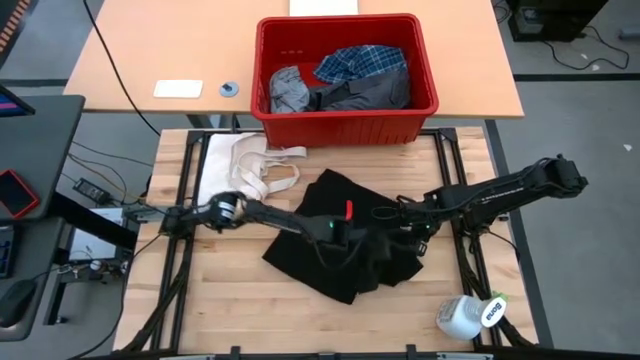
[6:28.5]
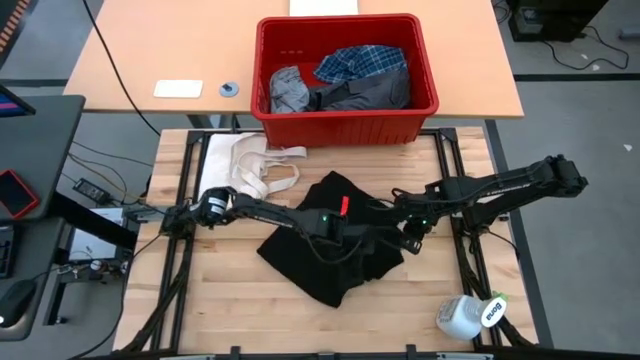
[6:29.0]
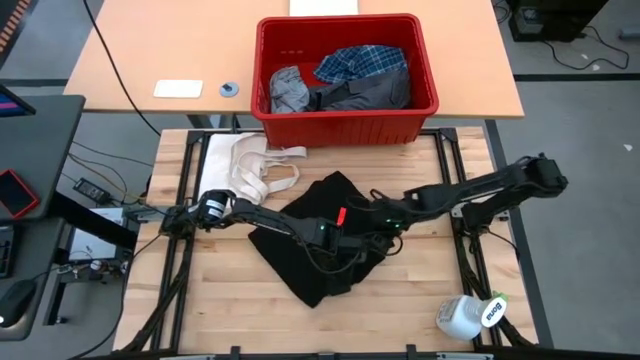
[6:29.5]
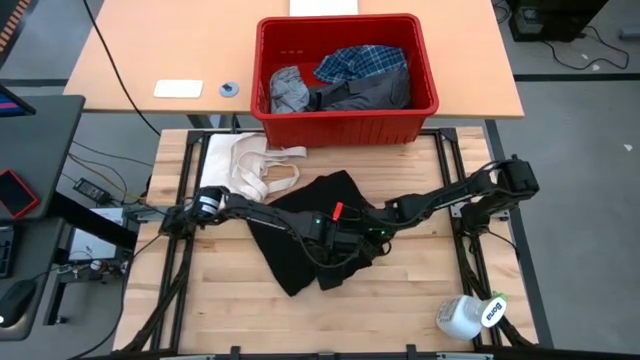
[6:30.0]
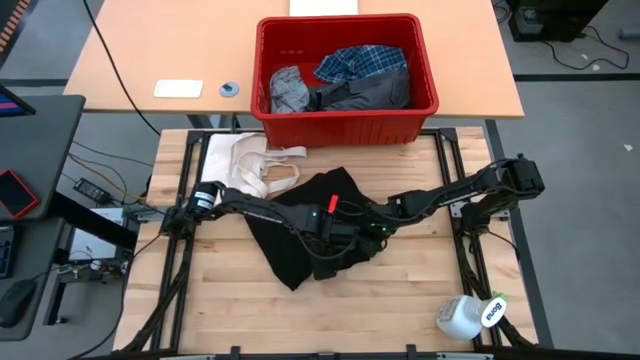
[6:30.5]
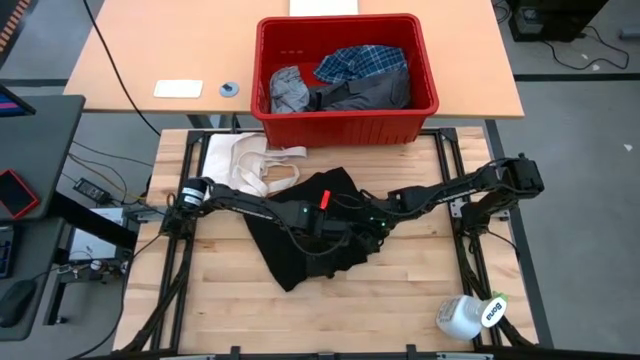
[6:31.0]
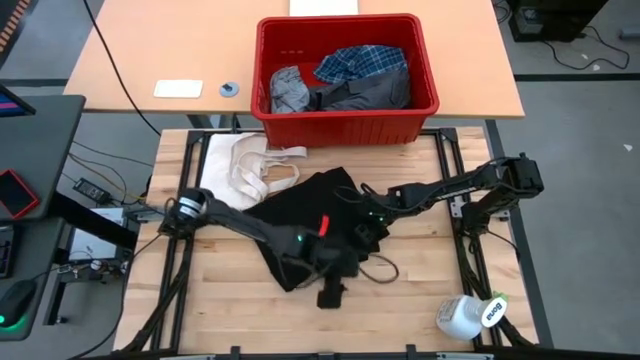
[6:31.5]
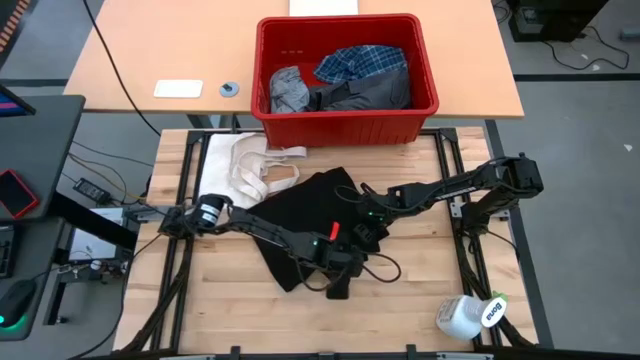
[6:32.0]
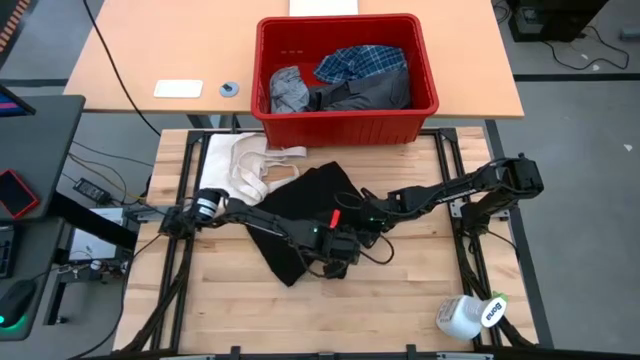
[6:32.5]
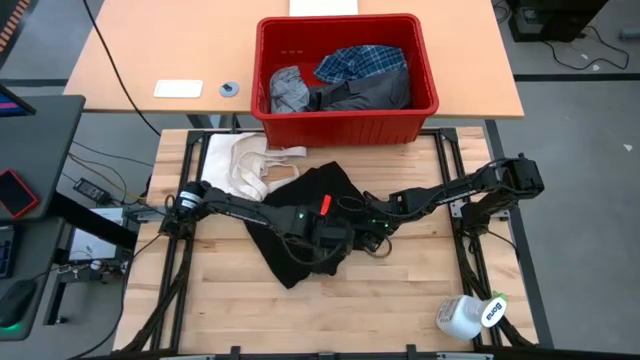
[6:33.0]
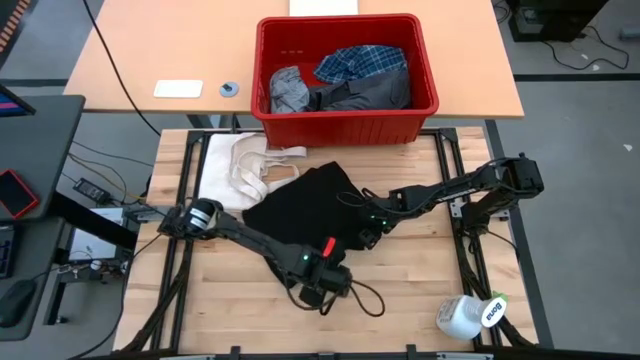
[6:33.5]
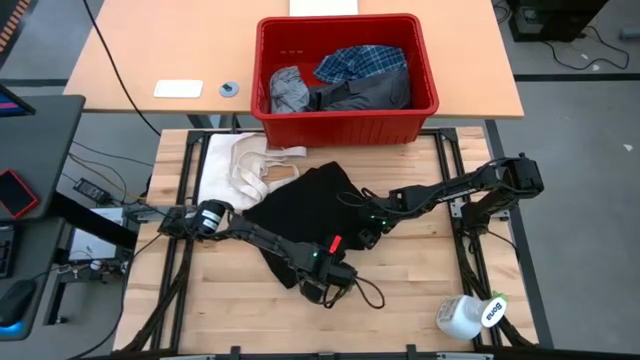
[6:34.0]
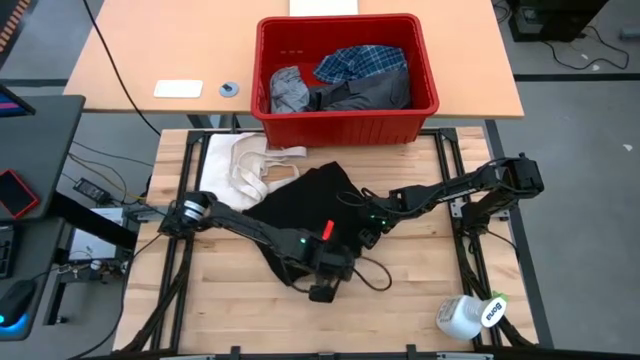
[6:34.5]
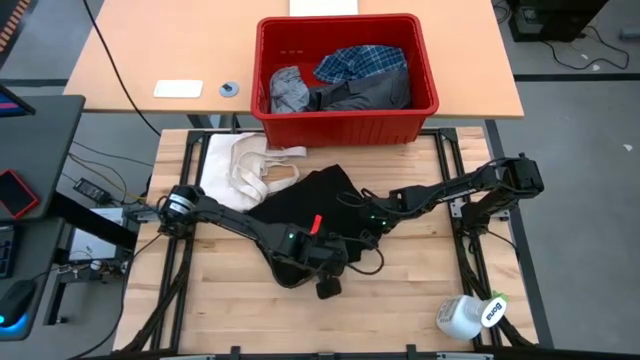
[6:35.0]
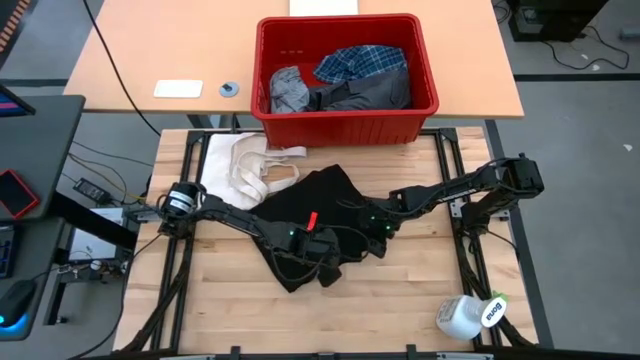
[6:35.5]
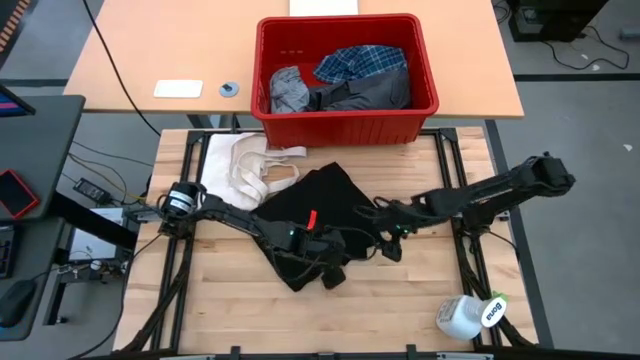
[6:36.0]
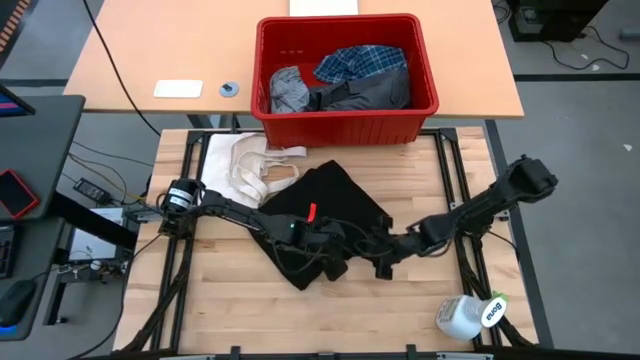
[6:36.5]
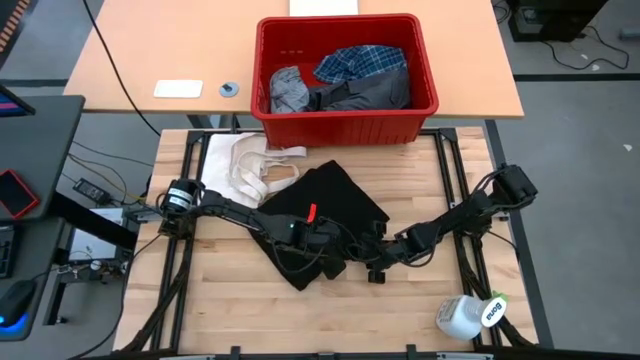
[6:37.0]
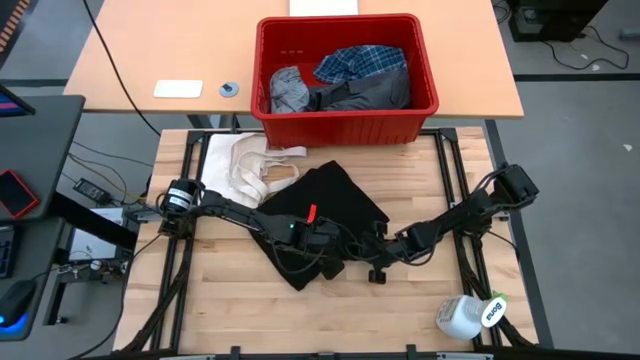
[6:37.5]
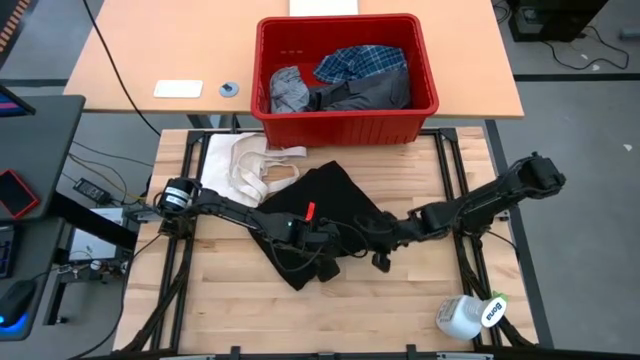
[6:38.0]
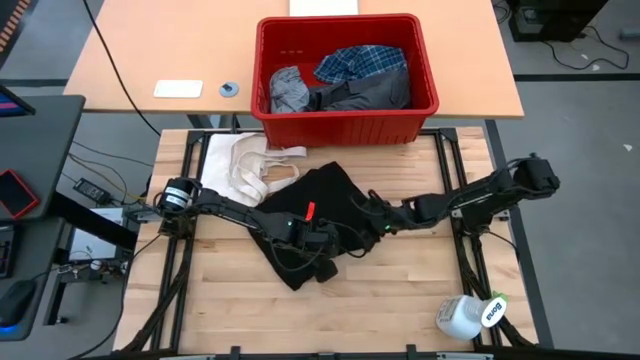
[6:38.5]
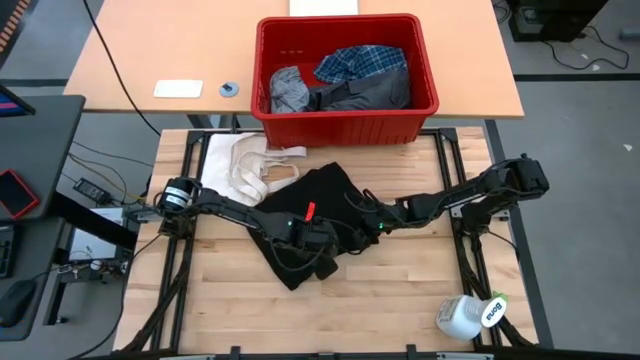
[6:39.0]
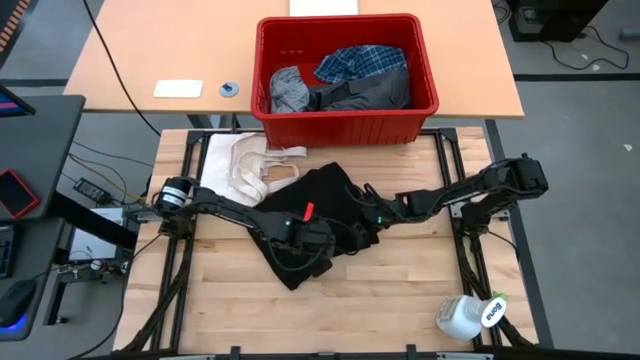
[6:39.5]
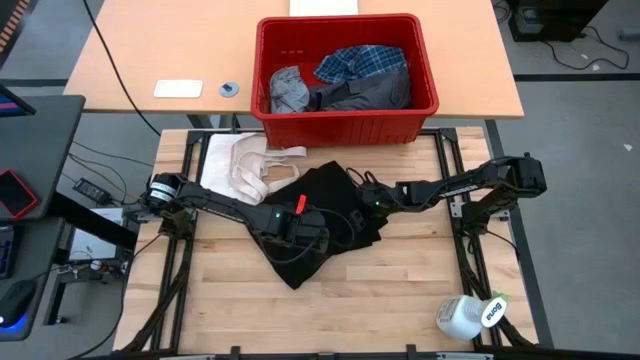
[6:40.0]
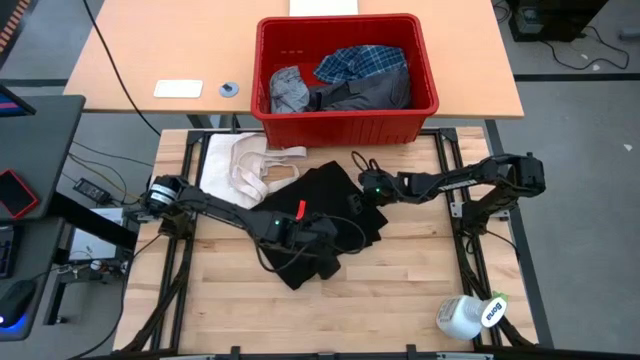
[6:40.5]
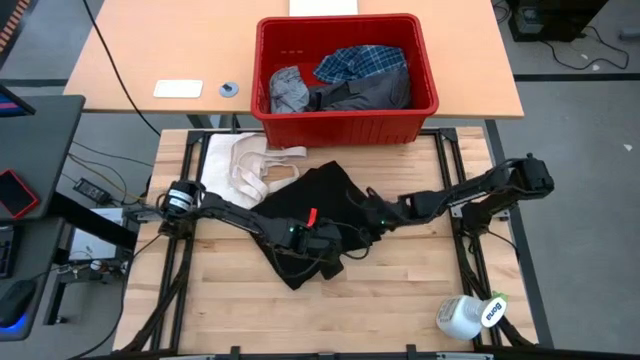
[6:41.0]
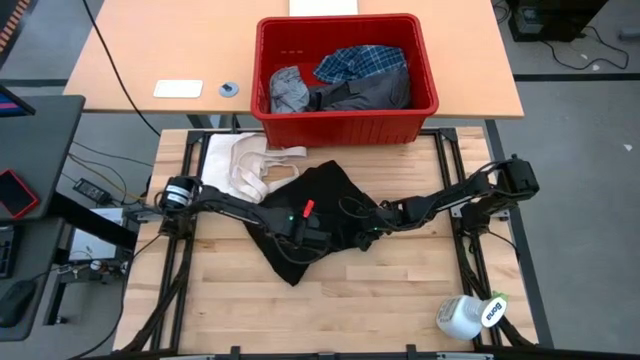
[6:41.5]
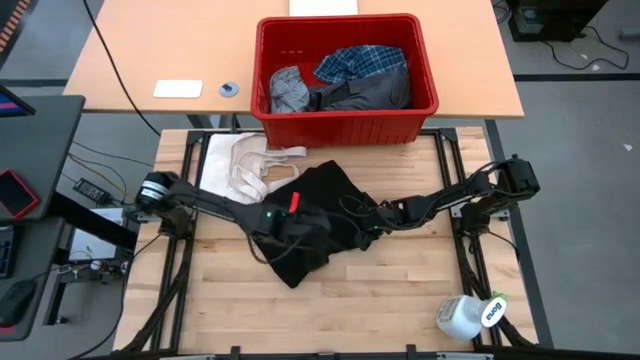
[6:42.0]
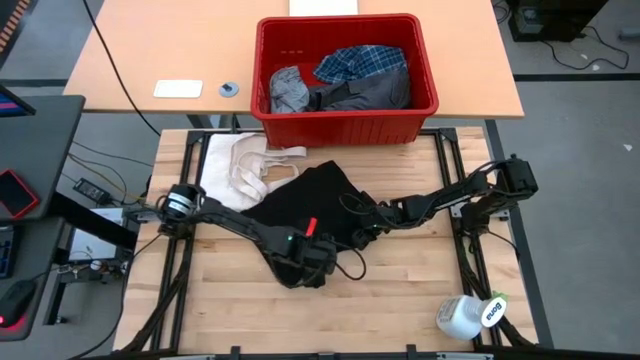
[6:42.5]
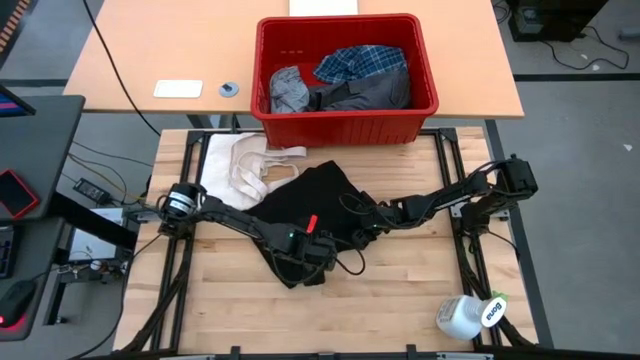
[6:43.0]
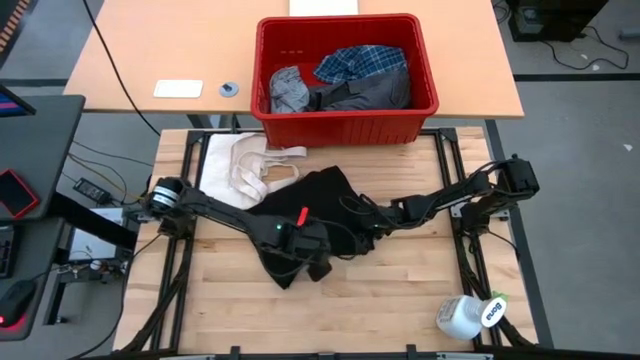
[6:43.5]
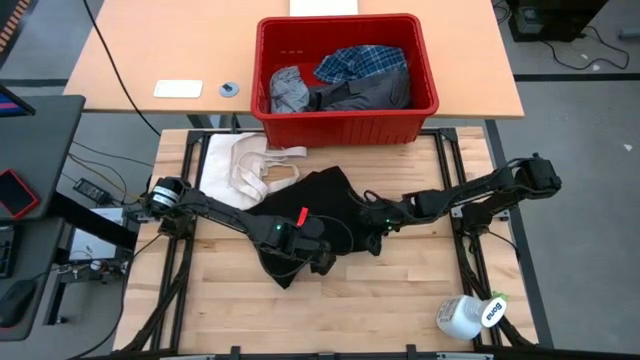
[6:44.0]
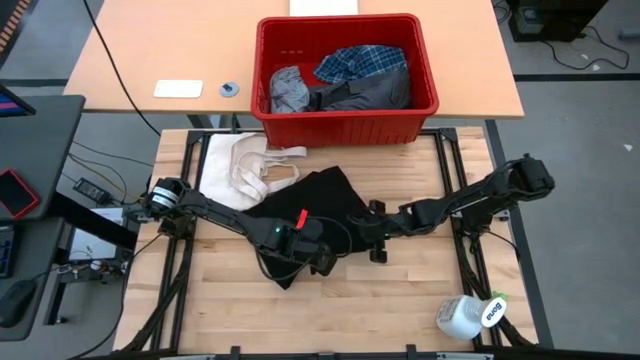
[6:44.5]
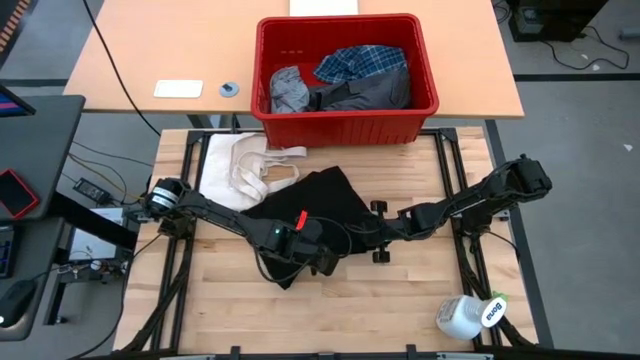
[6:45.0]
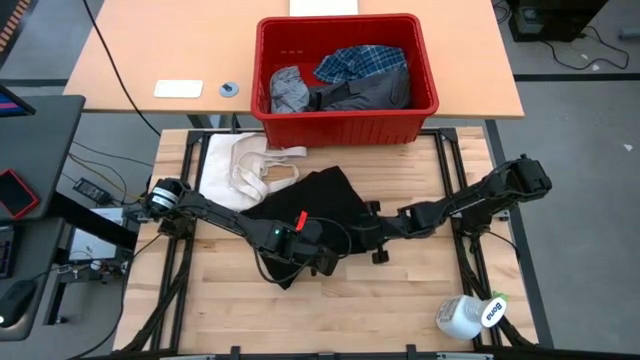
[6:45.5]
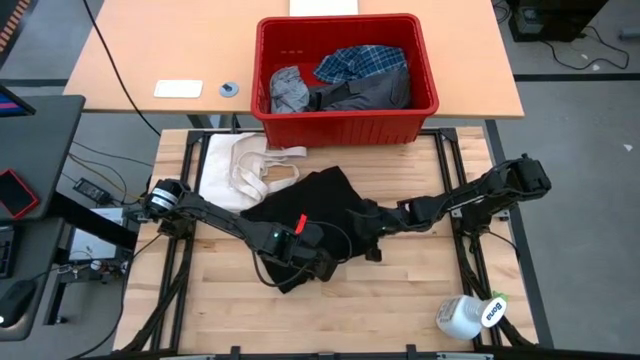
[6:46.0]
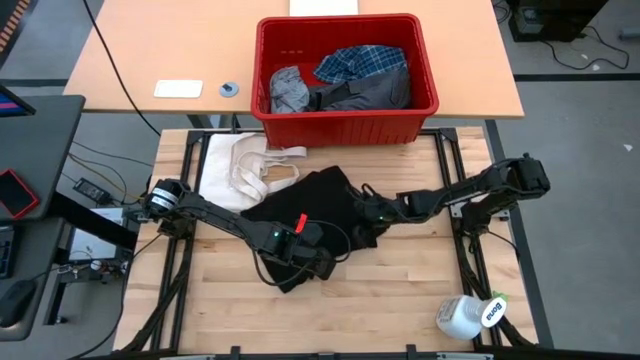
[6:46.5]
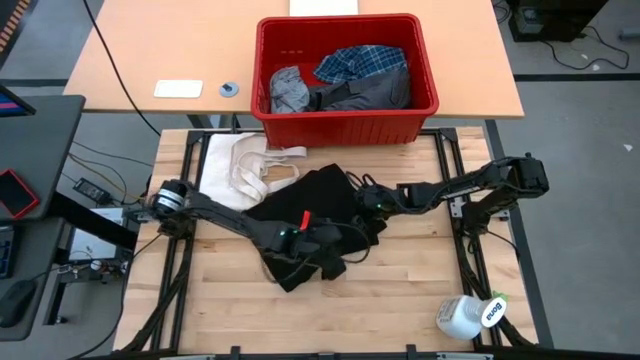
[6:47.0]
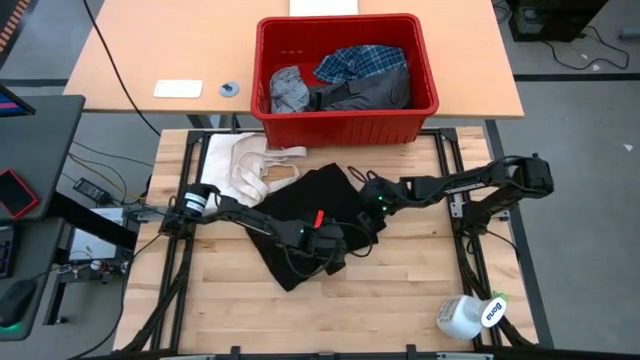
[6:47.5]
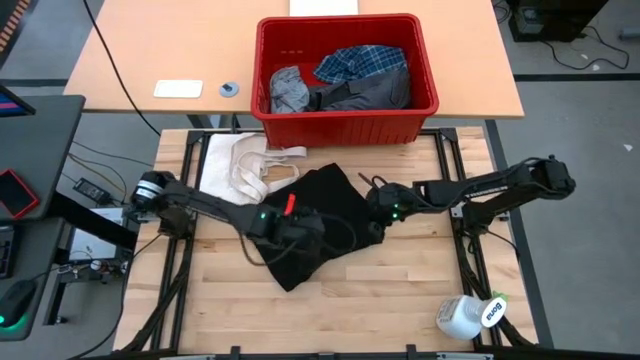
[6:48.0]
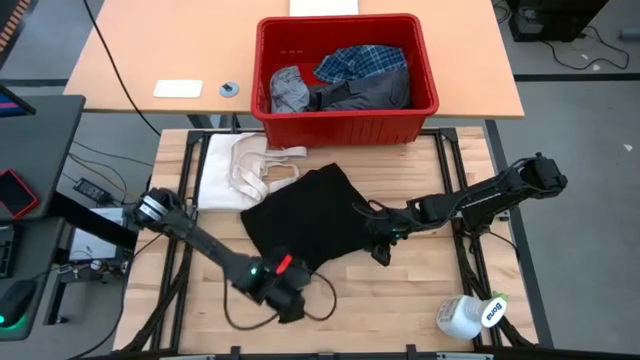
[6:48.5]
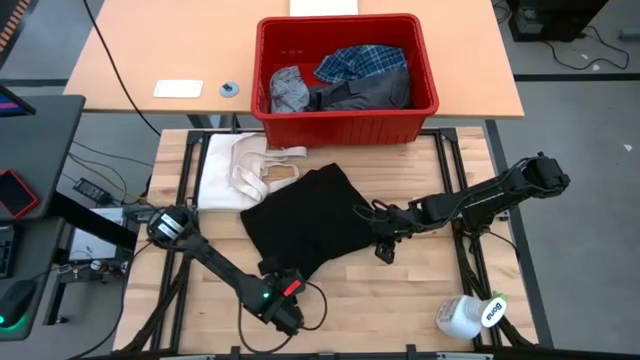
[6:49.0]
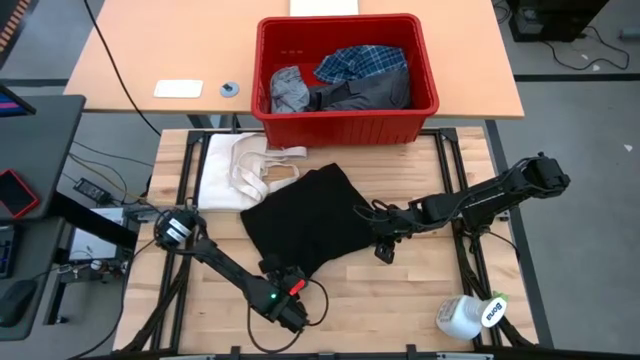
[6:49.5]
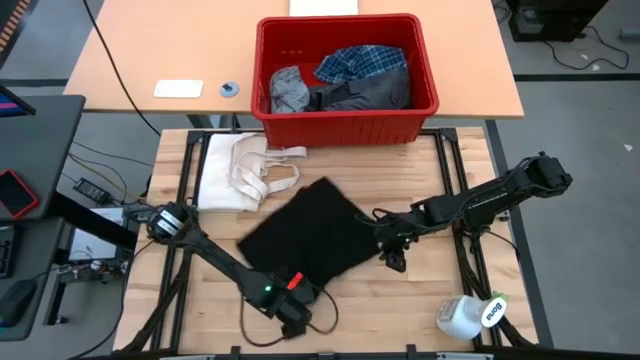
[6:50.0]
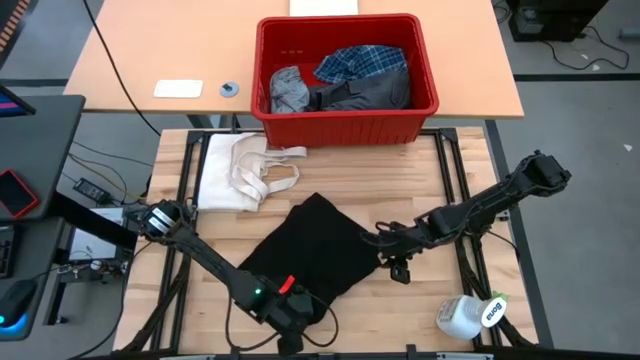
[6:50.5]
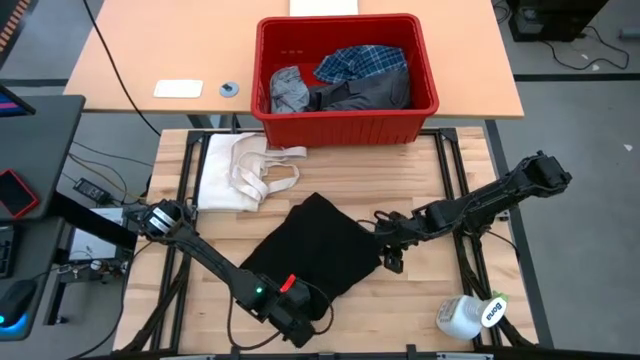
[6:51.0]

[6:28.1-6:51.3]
Task: Fold Laundry from Bin
Fold the black shirt
